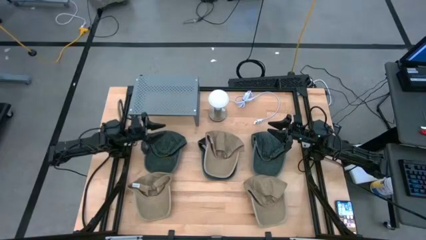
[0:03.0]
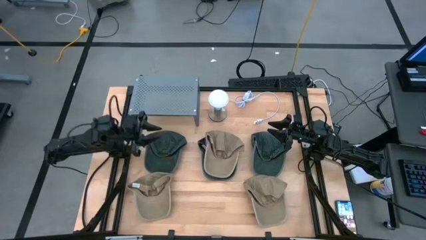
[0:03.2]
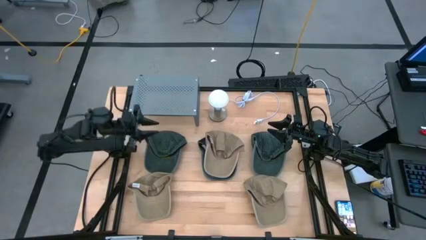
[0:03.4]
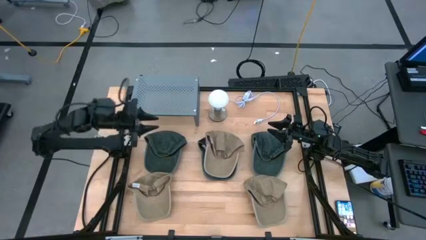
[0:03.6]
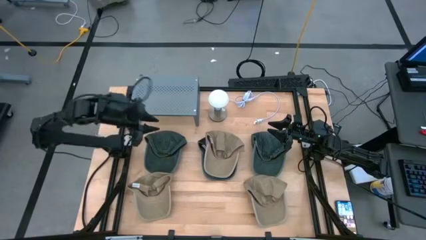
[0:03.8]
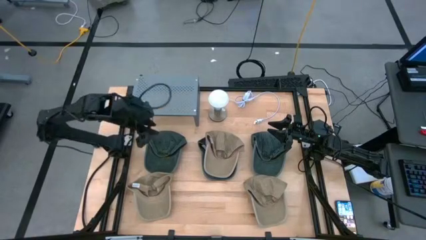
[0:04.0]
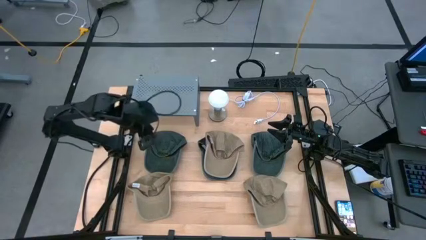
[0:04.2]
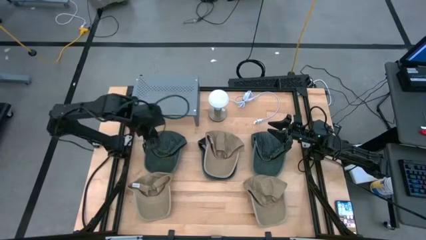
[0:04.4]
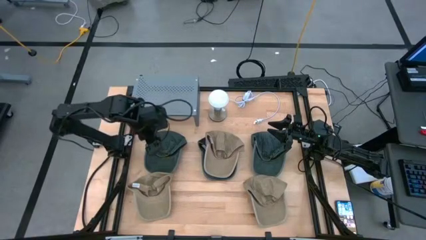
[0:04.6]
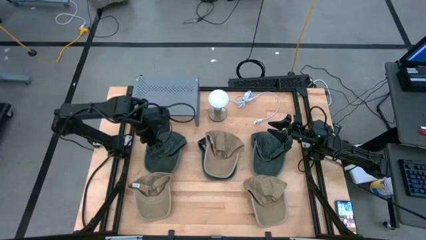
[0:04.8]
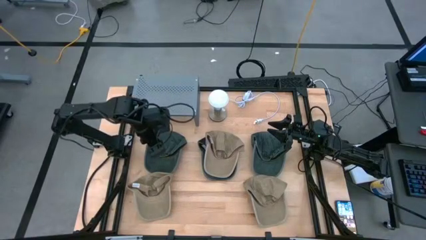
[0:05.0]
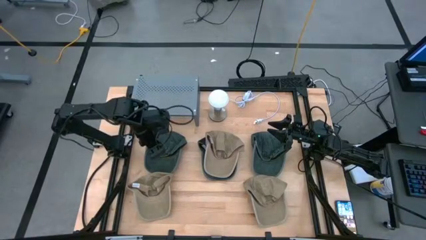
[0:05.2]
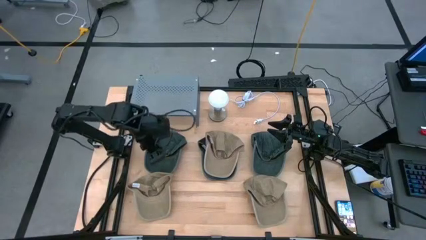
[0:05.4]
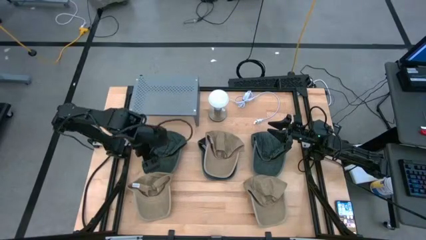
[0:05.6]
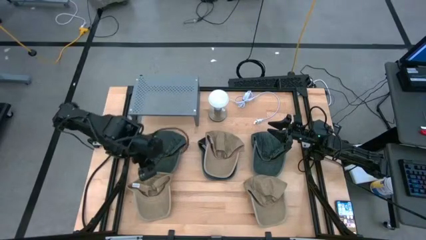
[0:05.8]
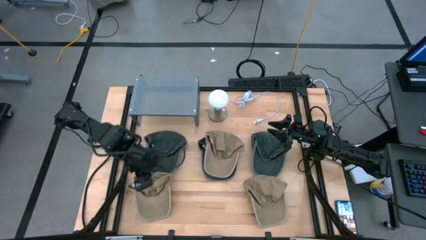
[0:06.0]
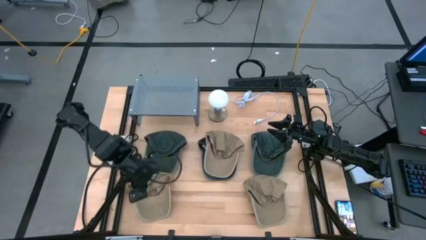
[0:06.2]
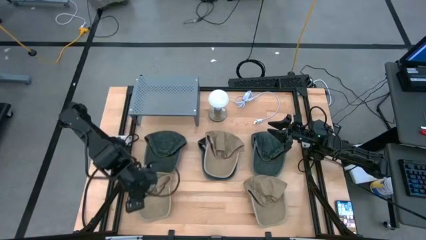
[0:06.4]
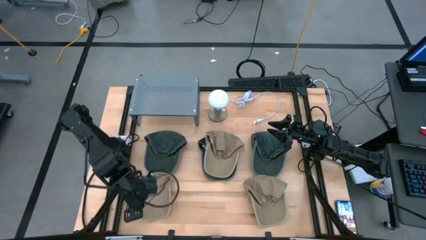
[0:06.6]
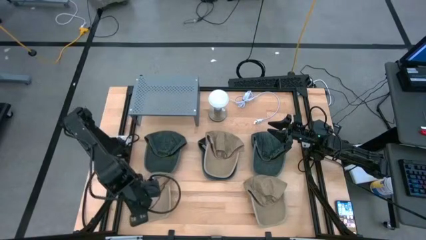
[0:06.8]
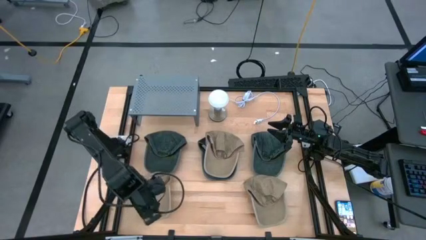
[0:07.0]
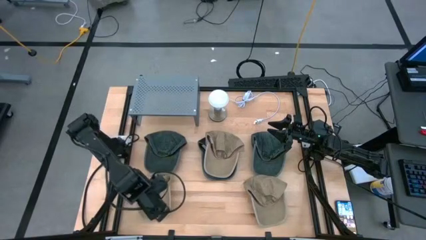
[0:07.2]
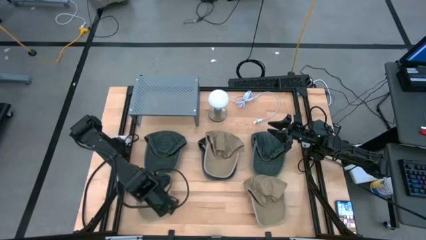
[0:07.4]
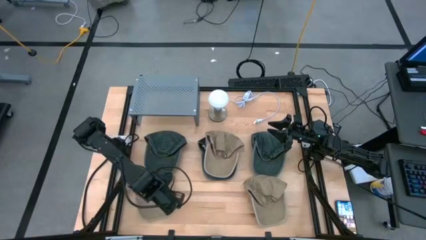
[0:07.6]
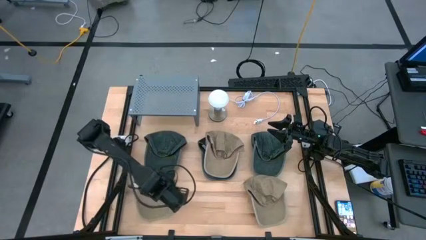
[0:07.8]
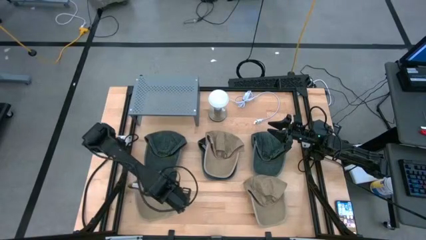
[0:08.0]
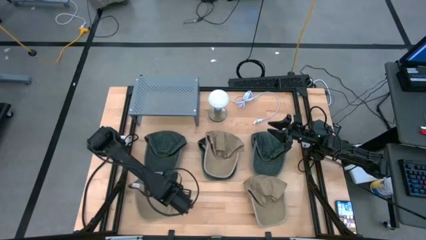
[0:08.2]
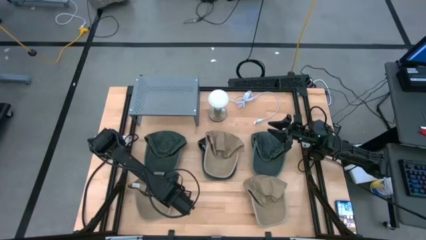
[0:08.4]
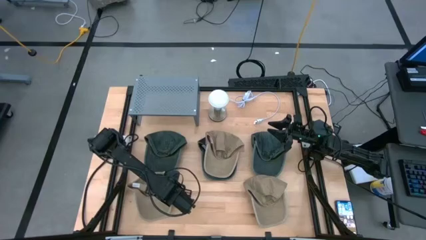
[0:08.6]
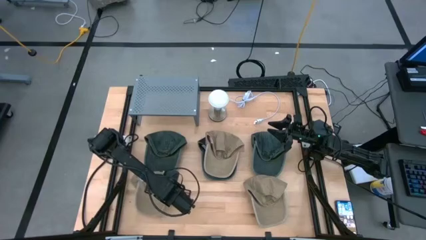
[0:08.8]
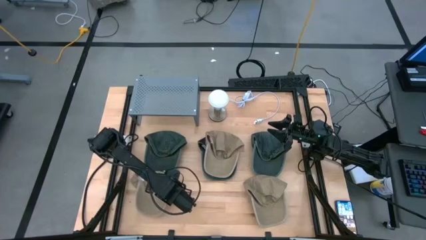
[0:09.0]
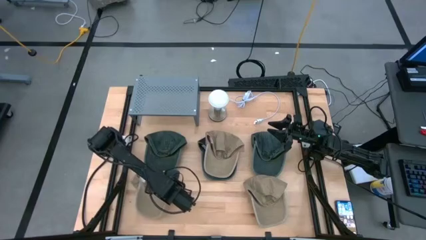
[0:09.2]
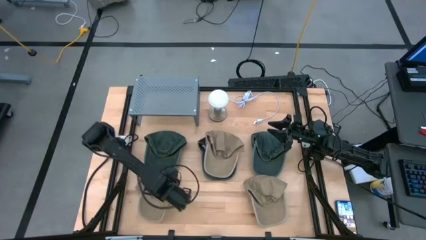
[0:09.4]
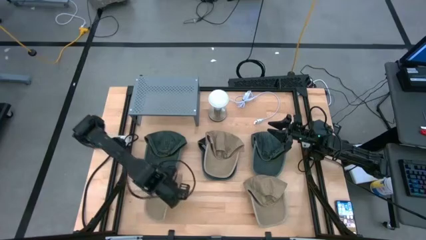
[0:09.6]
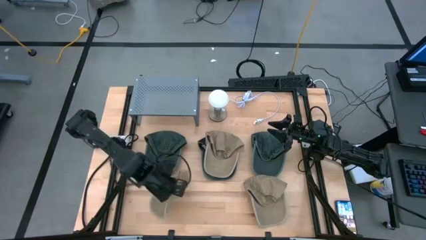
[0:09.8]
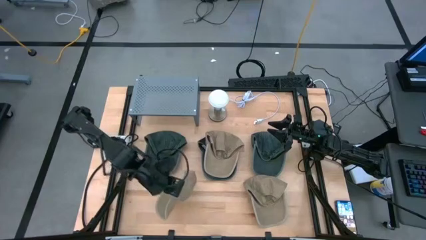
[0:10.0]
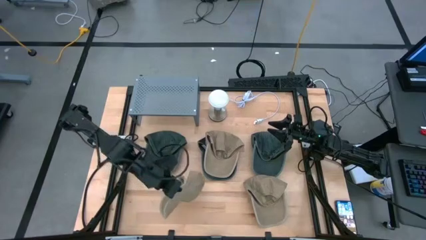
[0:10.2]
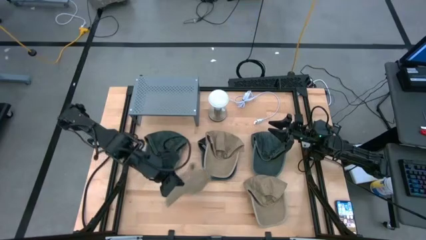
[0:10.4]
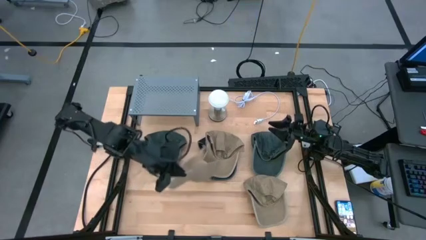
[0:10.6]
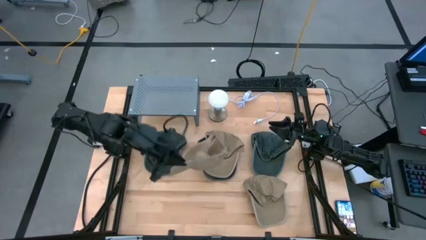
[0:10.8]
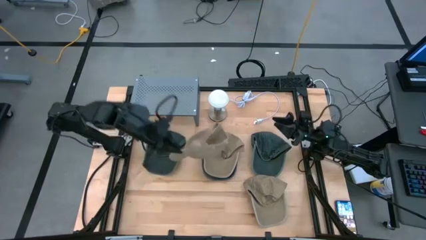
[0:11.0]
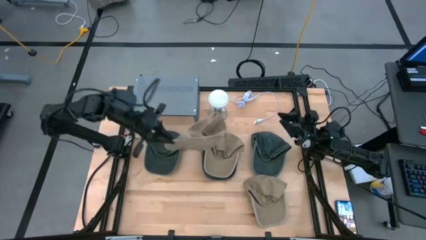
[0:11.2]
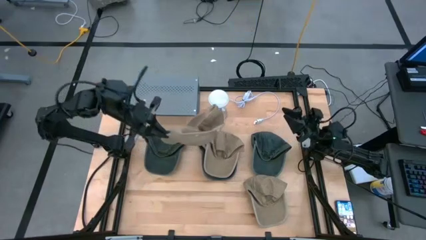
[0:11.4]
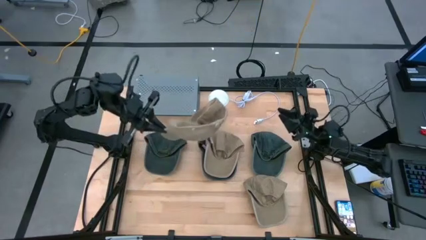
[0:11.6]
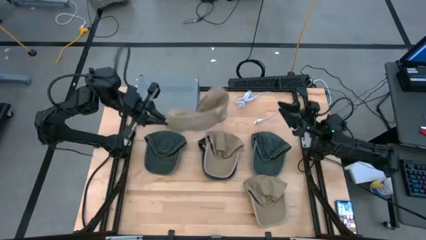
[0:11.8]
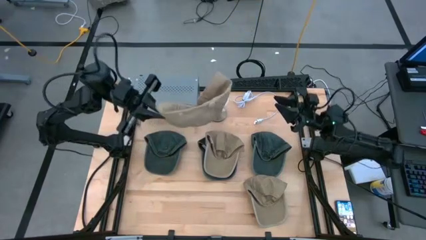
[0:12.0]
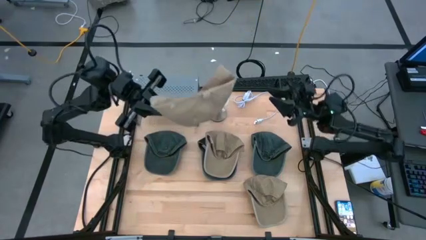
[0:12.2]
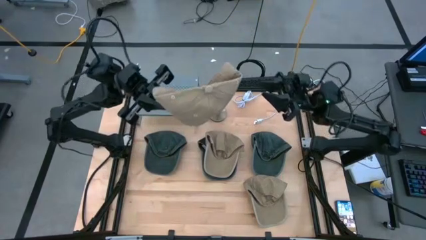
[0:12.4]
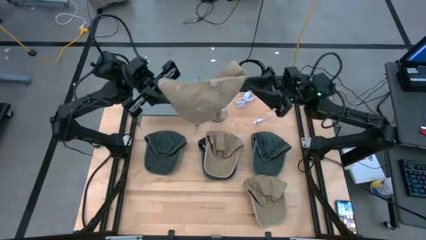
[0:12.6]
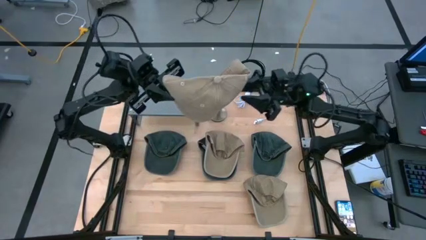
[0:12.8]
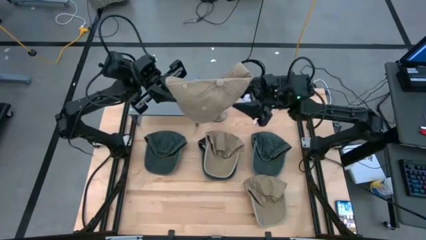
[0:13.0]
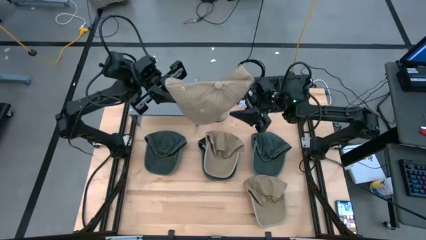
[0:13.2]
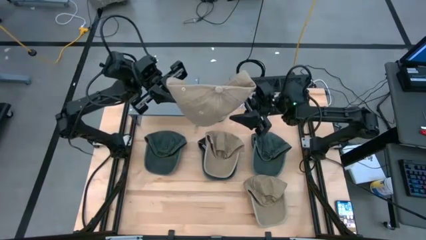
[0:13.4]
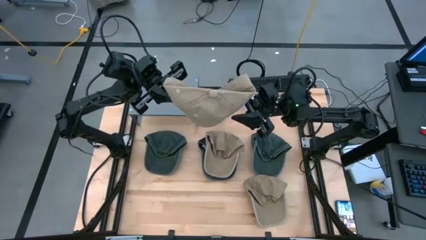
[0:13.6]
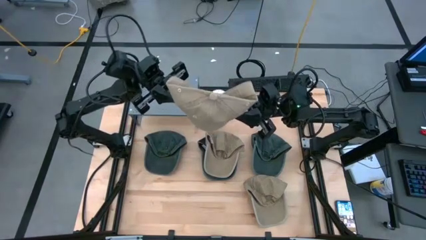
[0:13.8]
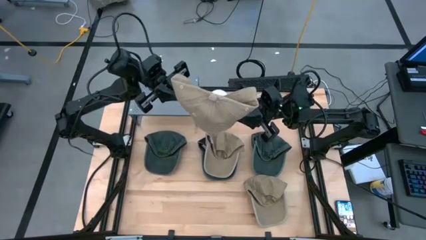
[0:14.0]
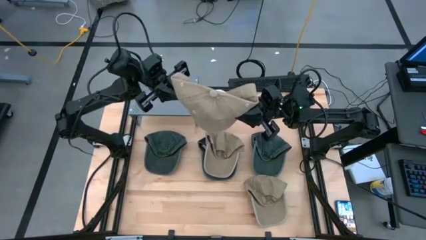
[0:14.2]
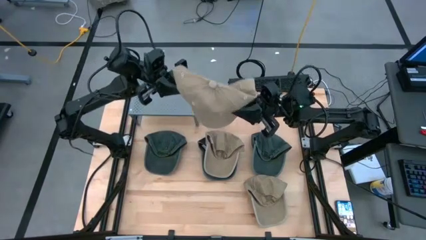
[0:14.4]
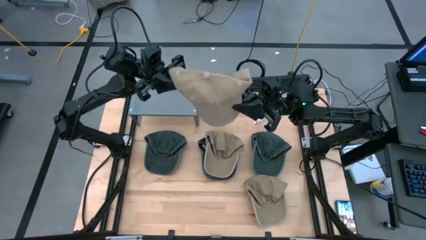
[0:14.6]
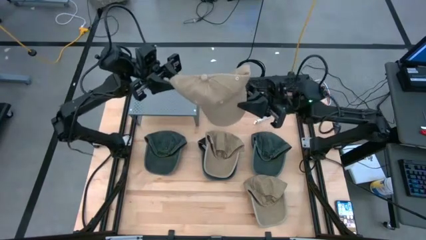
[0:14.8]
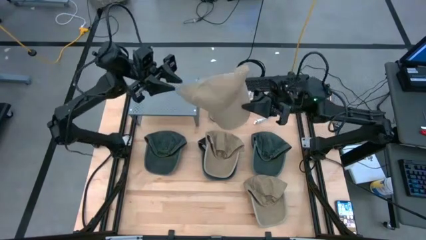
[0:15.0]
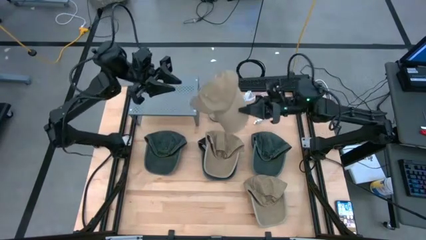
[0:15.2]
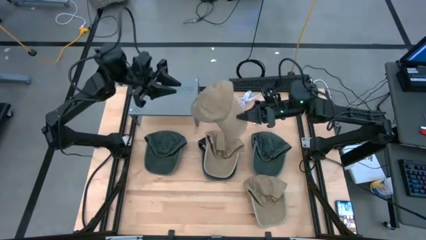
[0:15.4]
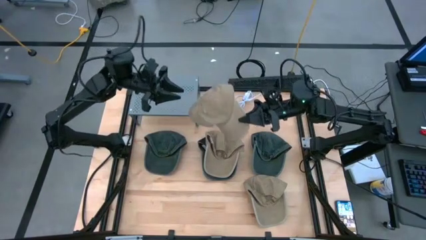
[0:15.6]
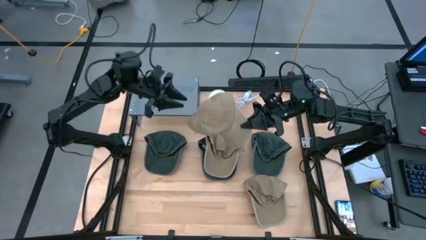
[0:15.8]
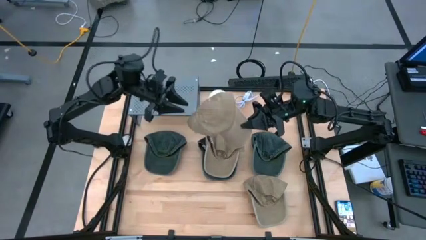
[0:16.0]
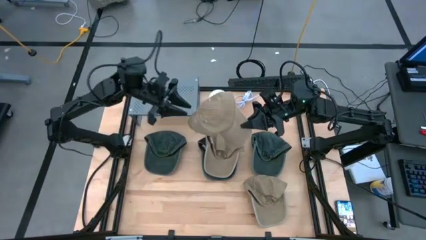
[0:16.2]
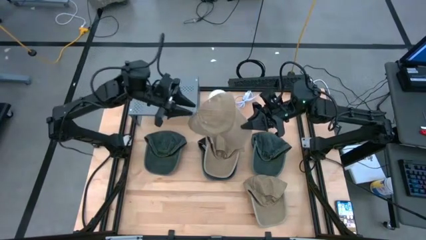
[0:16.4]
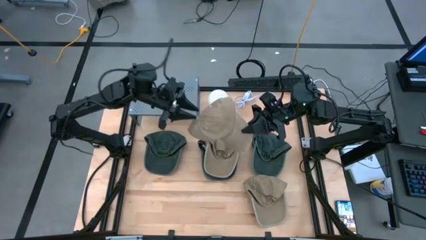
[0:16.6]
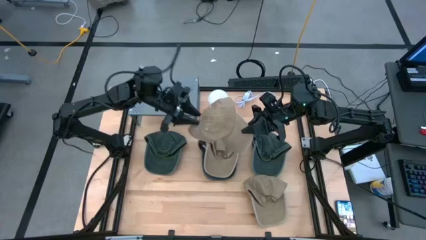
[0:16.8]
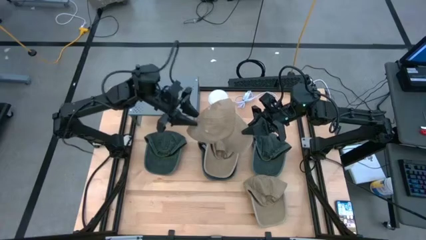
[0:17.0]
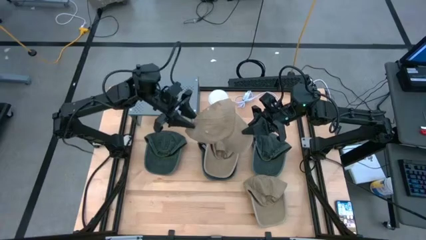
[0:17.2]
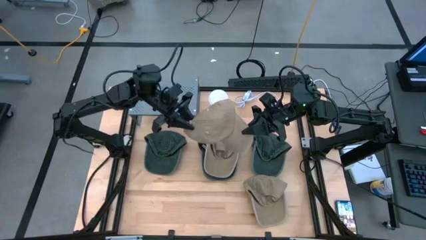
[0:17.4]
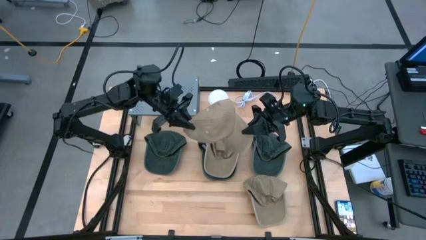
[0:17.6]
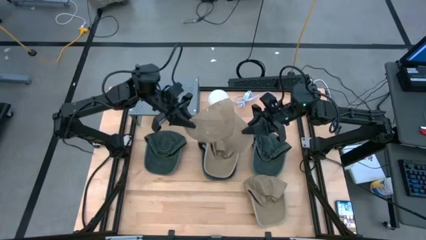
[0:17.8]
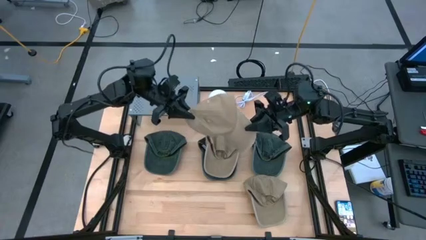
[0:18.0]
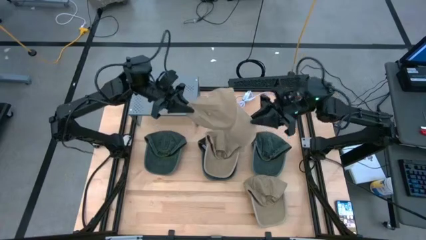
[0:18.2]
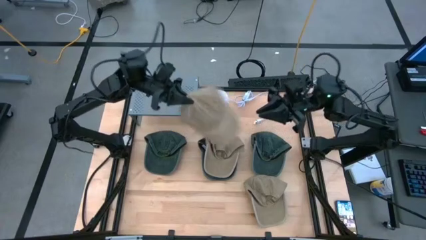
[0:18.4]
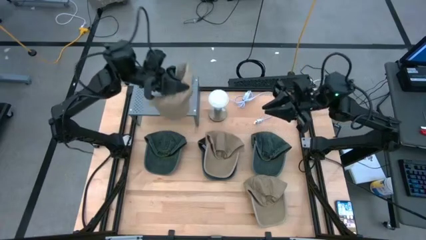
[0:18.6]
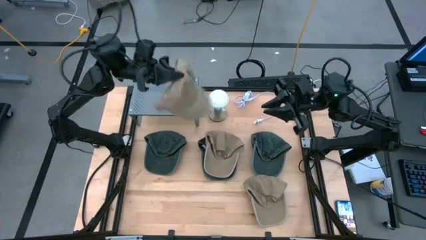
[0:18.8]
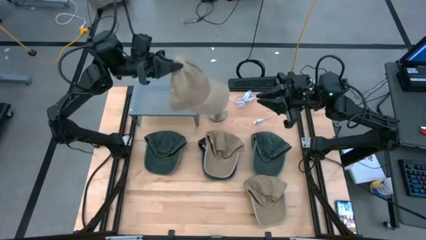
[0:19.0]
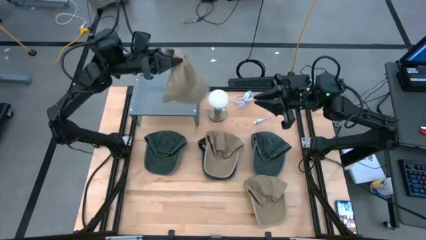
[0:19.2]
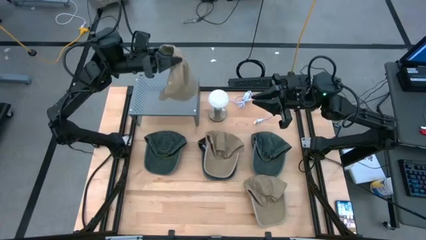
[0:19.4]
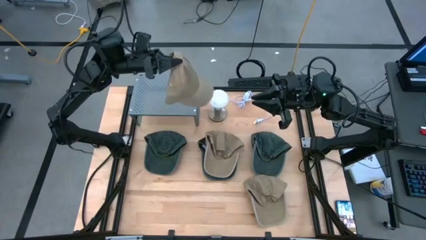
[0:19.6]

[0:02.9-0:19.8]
Task: Pick & Place hat
Put the left brown cap on the shelf
